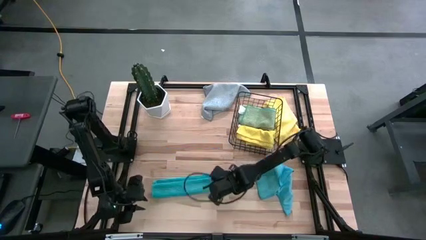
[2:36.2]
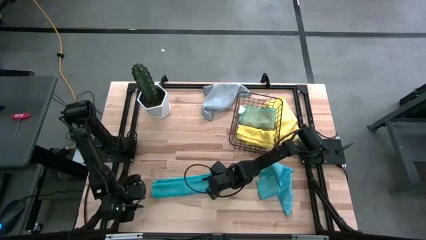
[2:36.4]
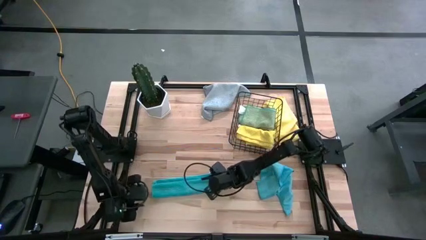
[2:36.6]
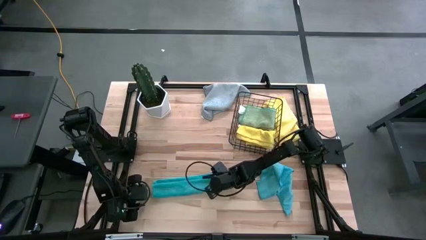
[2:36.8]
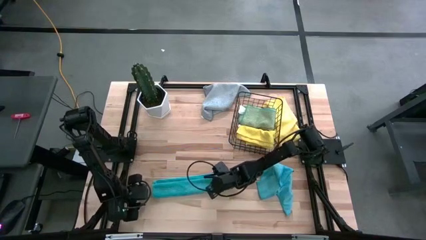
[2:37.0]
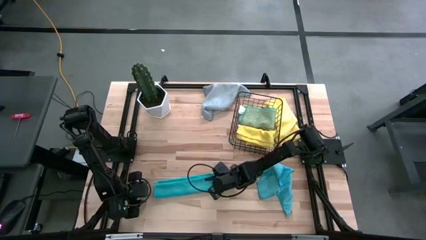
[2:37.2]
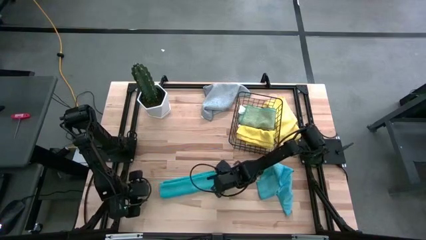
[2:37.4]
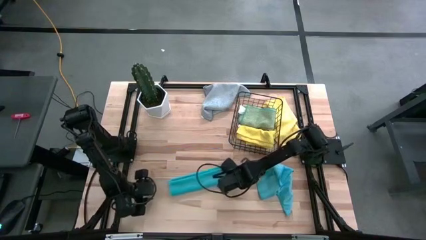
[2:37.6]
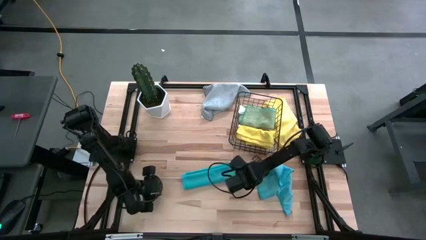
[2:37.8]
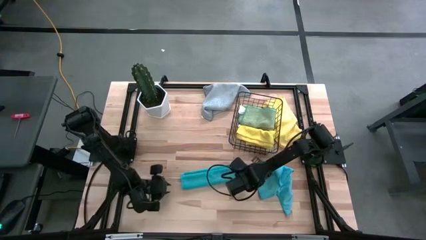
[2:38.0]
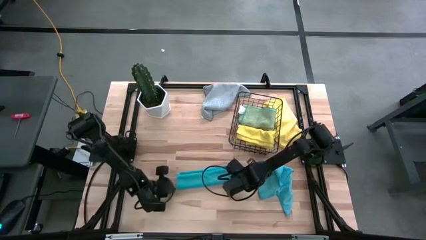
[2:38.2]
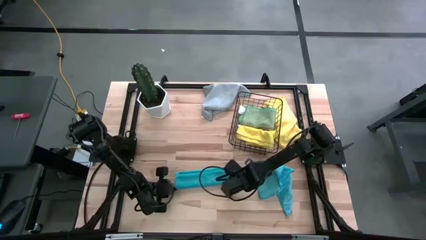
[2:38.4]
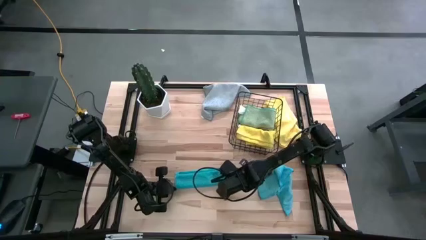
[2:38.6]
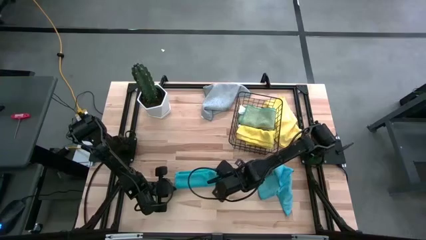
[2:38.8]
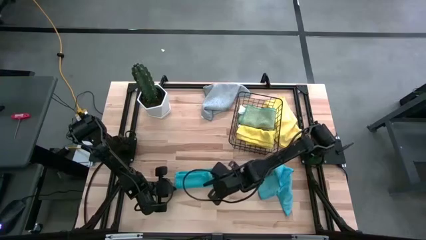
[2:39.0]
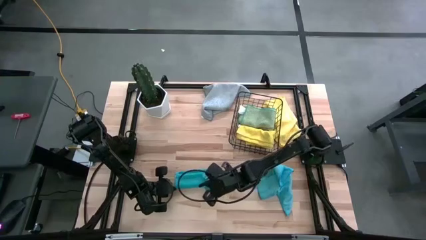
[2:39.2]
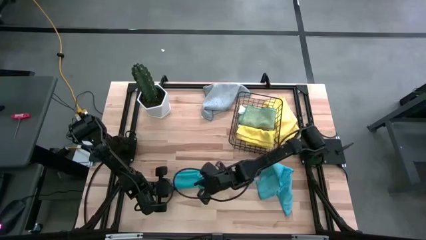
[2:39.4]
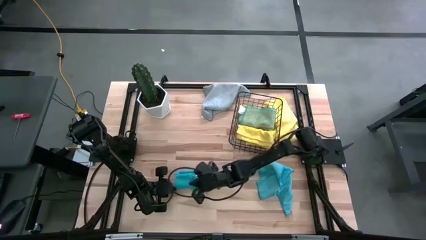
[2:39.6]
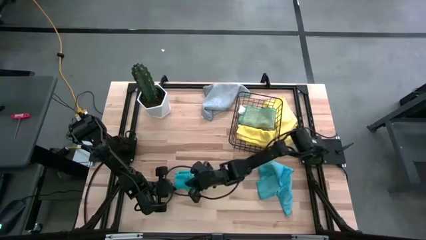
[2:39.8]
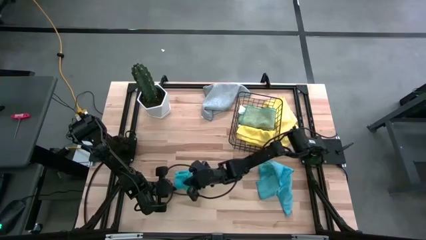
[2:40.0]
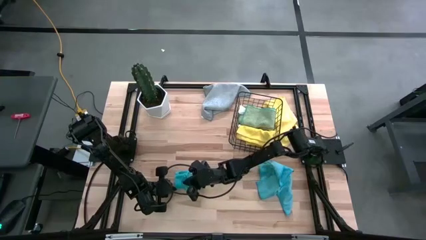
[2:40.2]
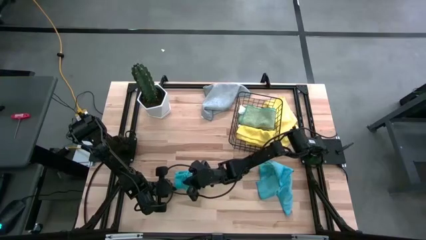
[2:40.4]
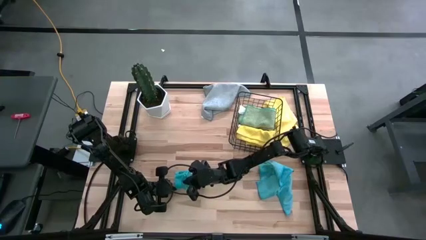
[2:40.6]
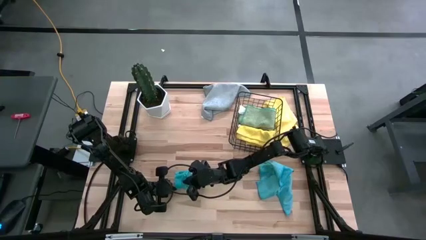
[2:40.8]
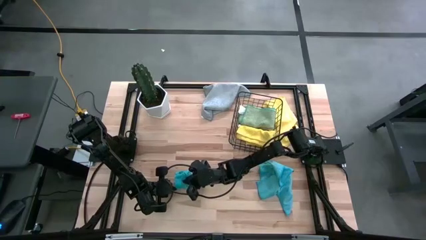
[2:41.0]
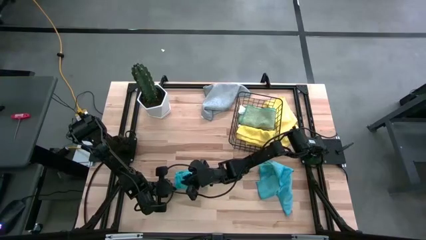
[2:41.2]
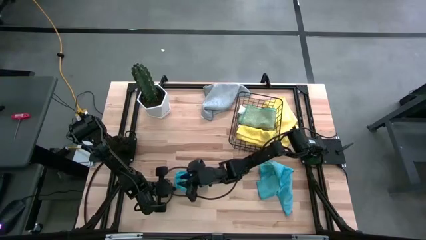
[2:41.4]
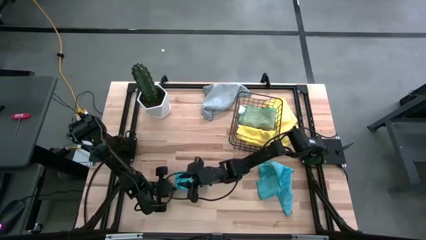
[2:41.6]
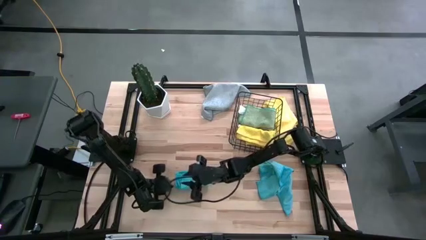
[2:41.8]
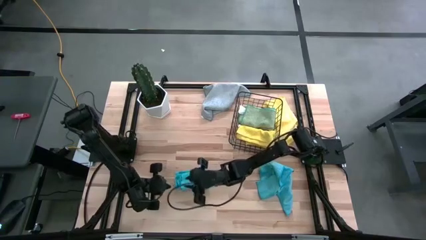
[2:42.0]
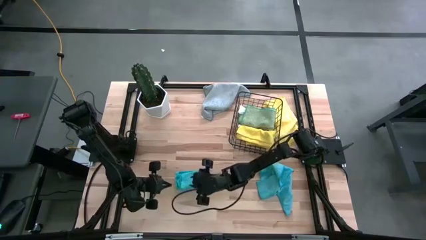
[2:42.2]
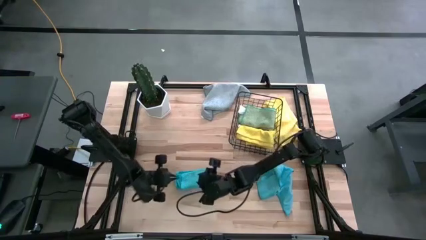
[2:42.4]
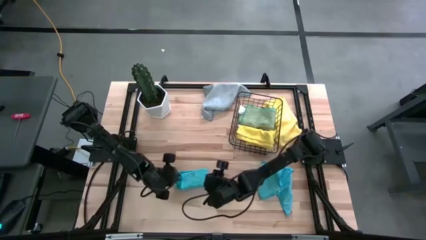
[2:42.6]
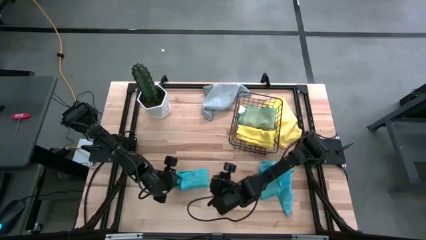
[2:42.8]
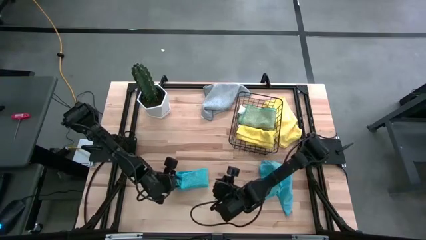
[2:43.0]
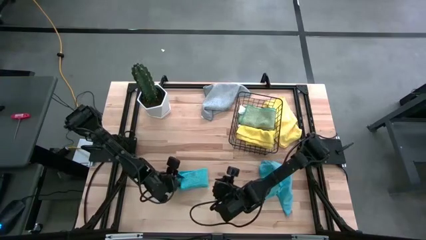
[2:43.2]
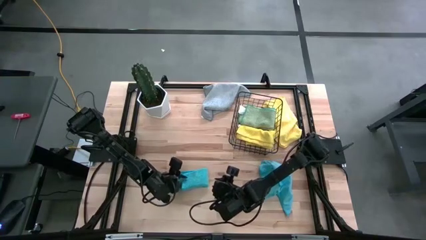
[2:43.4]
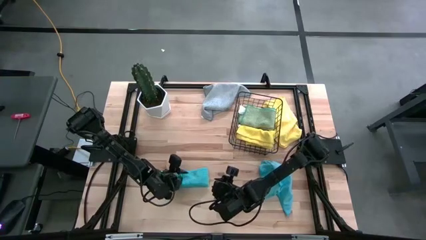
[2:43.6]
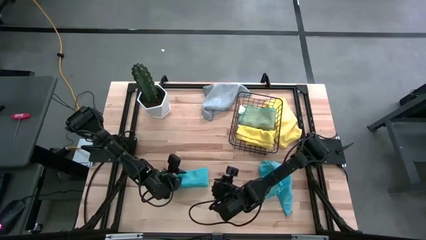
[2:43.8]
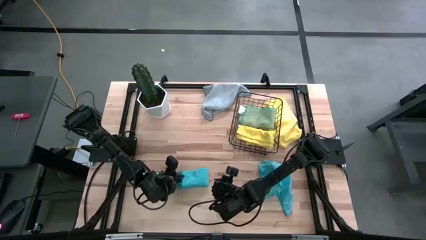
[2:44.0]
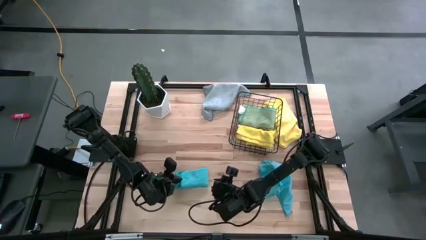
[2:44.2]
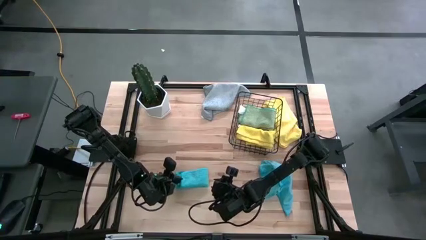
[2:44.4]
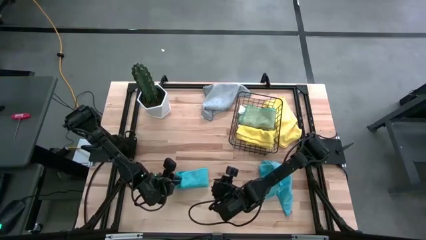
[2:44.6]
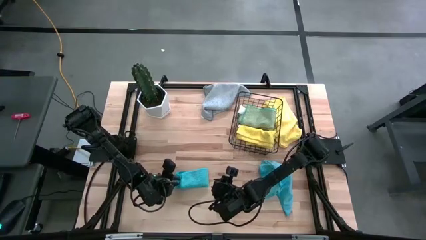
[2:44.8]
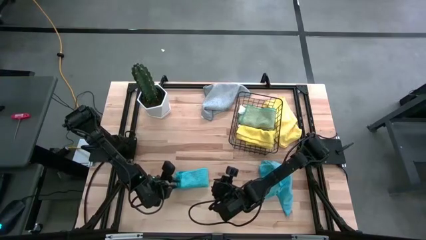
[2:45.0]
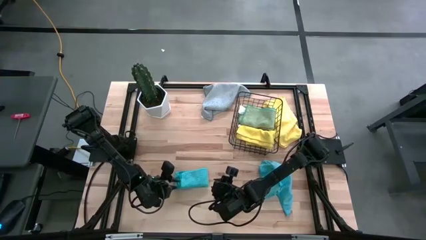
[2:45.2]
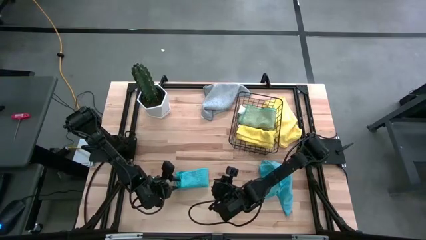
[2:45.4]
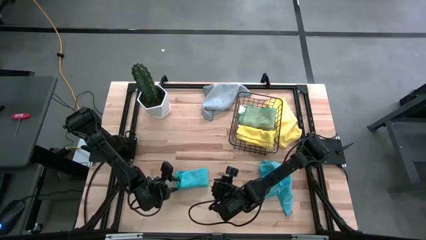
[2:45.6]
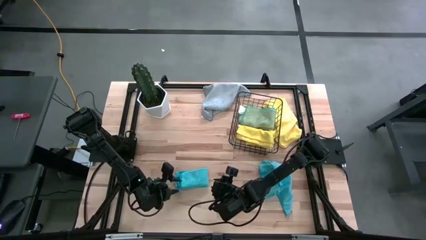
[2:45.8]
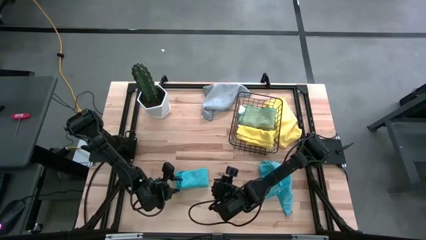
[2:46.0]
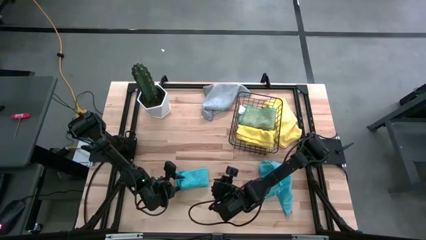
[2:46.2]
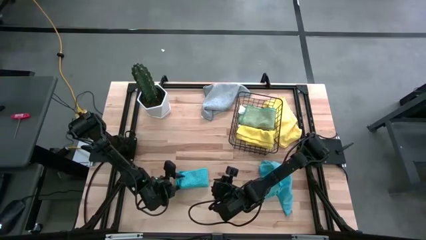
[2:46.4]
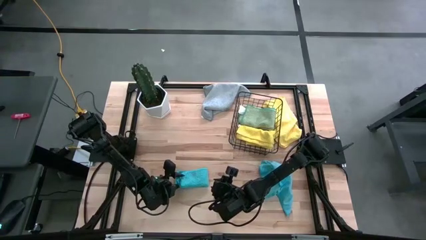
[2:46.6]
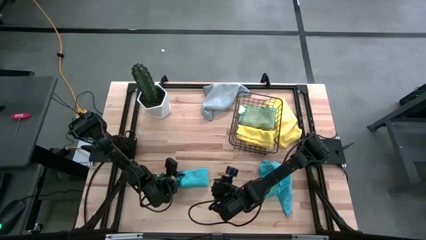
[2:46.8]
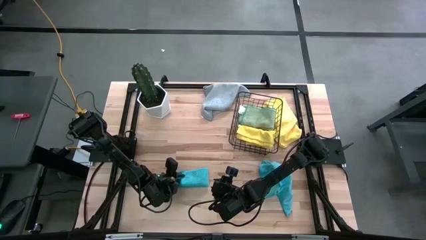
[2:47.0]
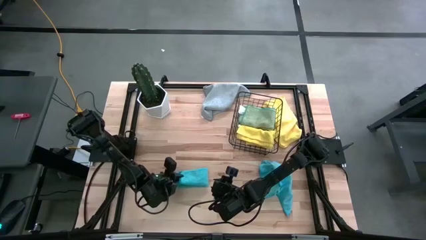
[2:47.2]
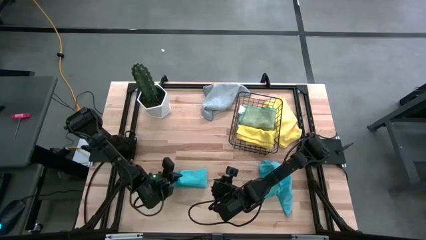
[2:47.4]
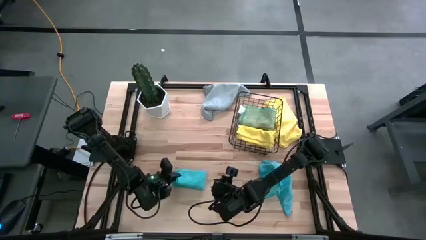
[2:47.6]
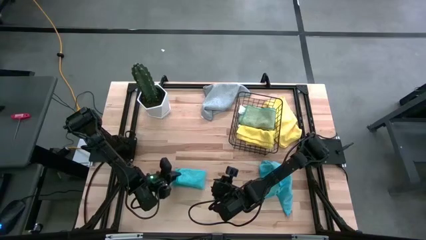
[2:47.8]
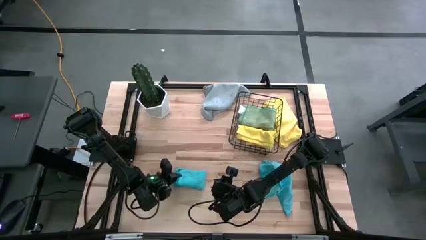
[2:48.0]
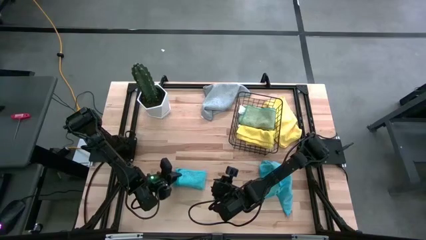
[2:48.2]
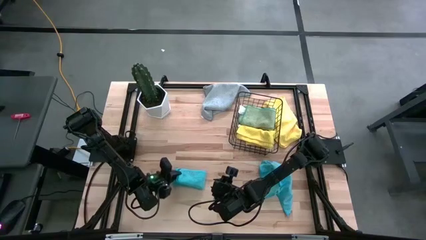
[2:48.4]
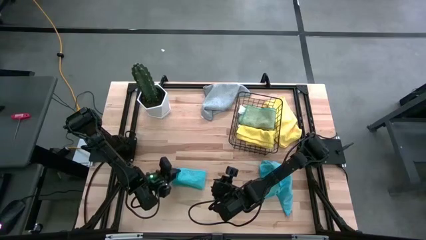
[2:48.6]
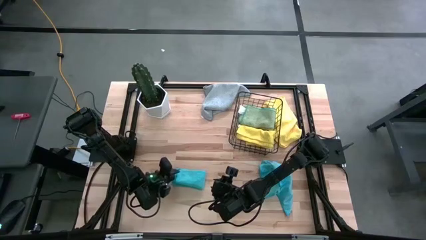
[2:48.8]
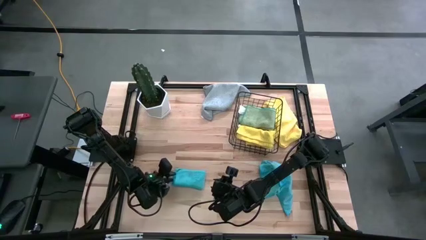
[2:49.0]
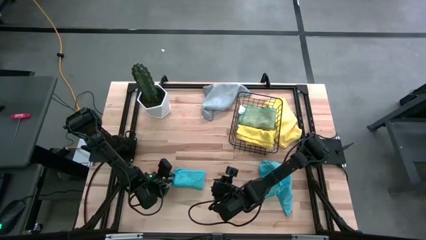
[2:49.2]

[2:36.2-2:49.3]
Task: Fold microfiber towels
Fold the top blue microfiber towel

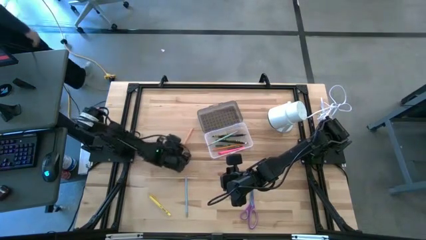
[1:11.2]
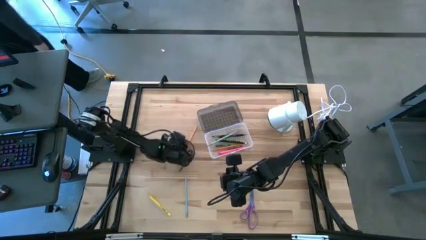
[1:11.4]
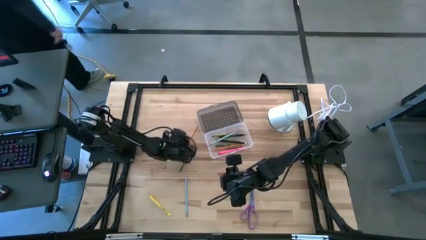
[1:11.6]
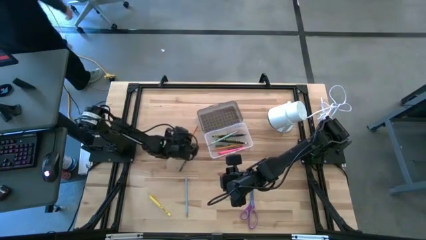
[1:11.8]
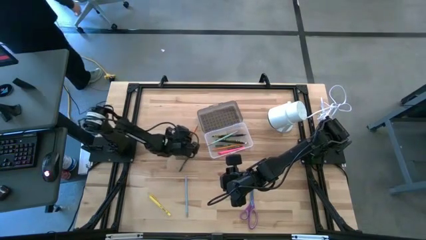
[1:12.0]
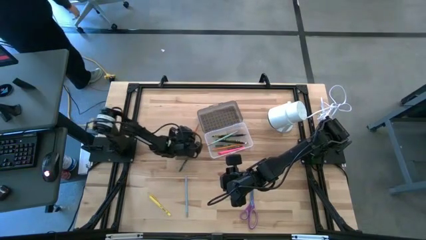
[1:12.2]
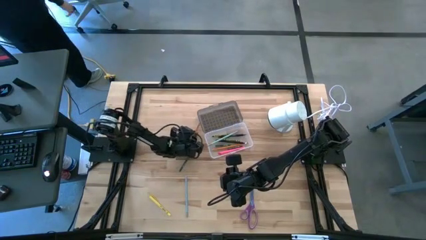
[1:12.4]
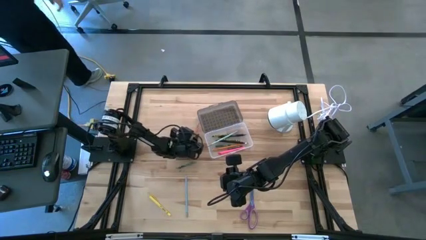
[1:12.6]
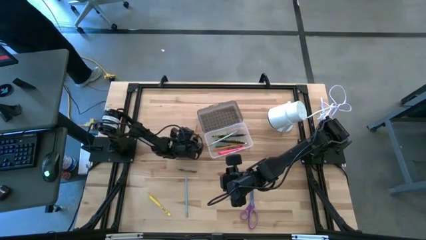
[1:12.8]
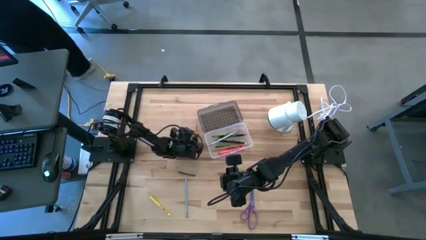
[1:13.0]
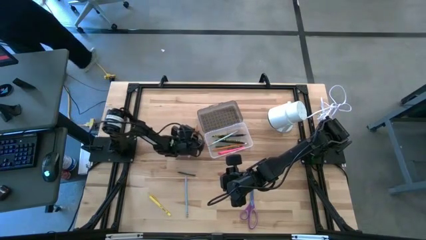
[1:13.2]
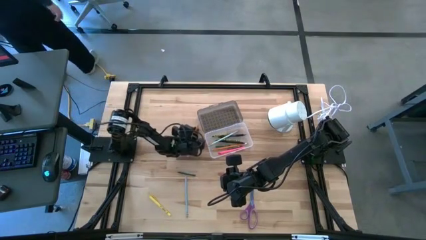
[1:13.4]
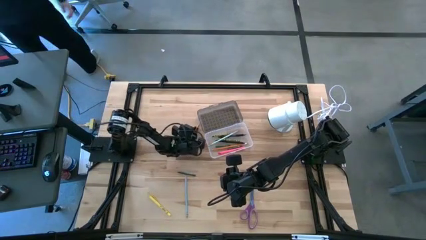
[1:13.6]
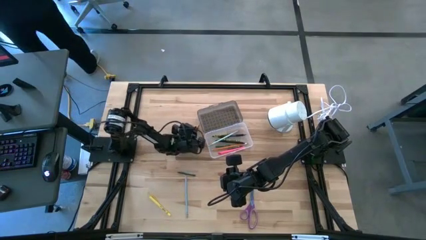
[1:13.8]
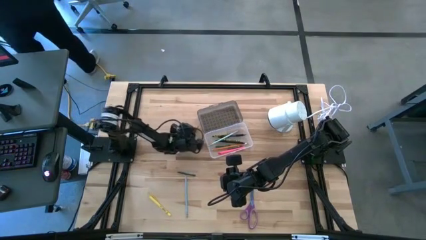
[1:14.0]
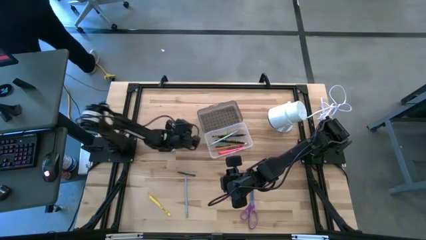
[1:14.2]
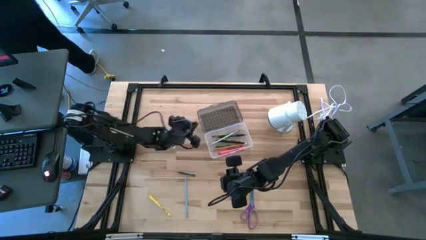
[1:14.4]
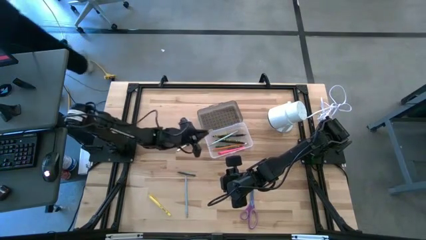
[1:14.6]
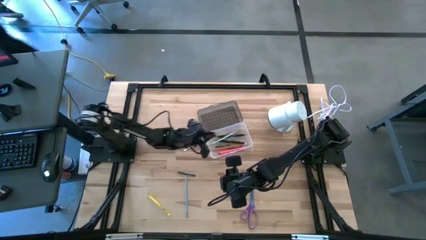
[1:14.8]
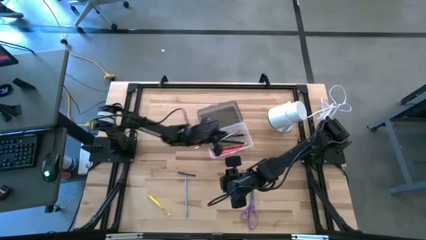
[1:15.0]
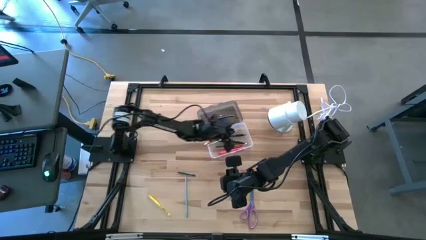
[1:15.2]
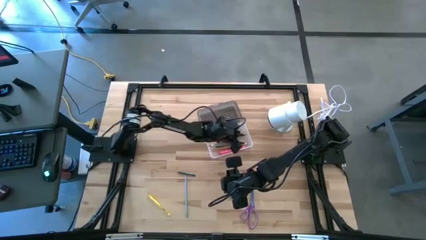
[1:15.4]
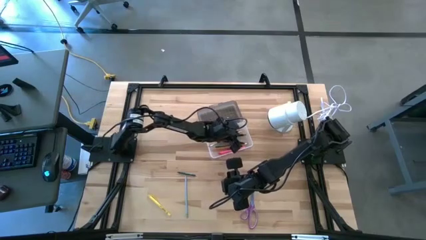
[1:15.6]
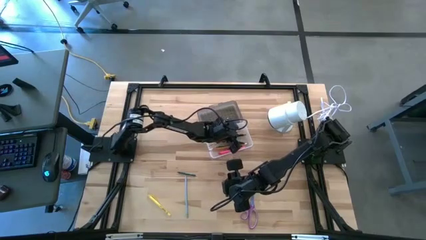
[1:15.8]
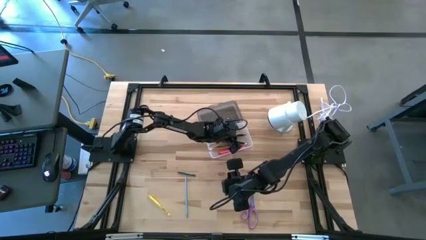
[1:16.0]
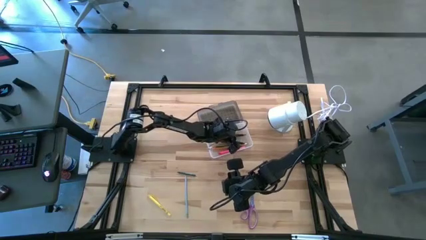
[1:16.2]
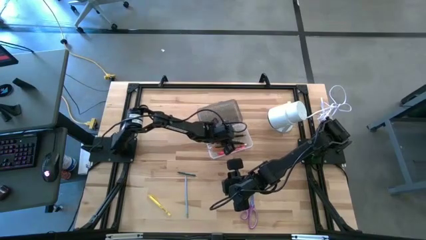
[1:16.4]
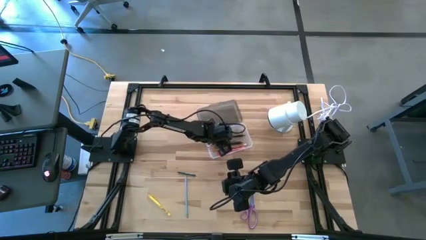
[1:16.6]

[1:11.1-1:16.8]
Task: Pick & place school supplies into a supply box
Put the orange pencil into the gray supply box
